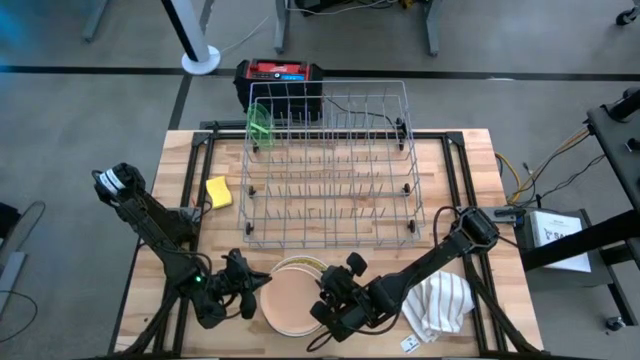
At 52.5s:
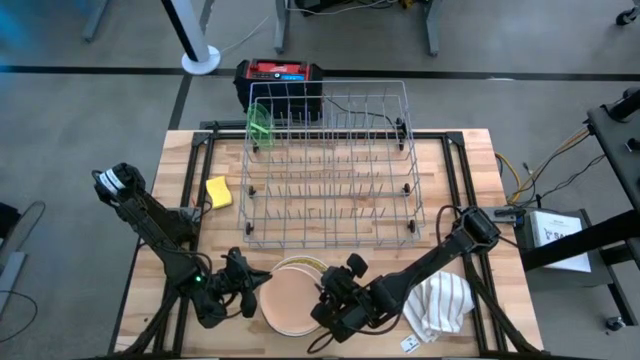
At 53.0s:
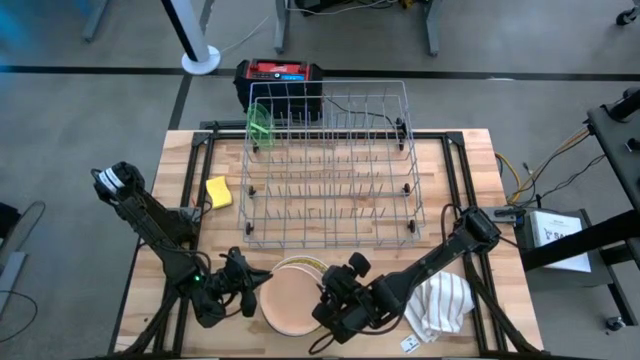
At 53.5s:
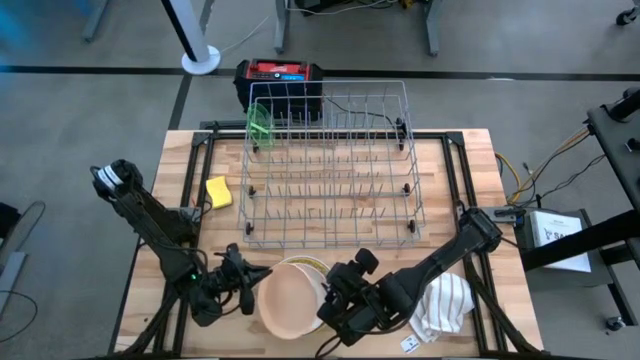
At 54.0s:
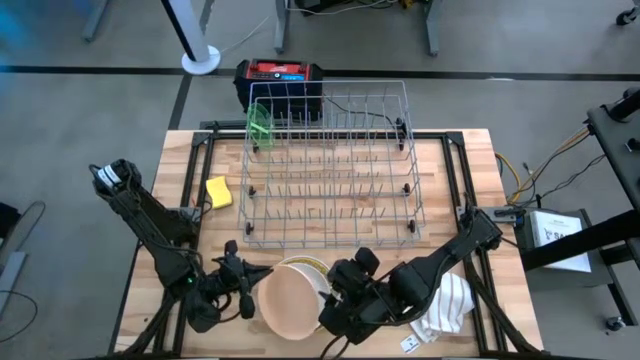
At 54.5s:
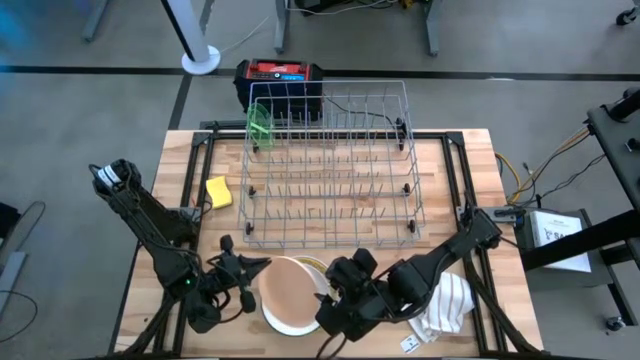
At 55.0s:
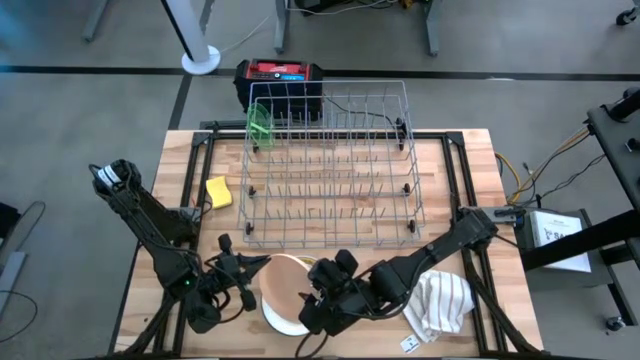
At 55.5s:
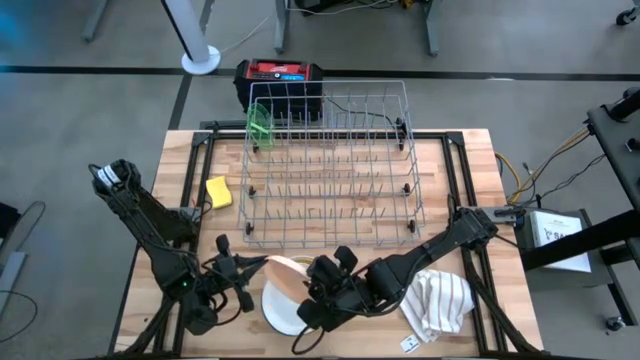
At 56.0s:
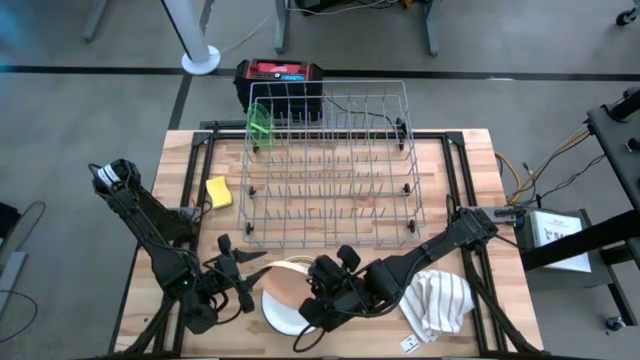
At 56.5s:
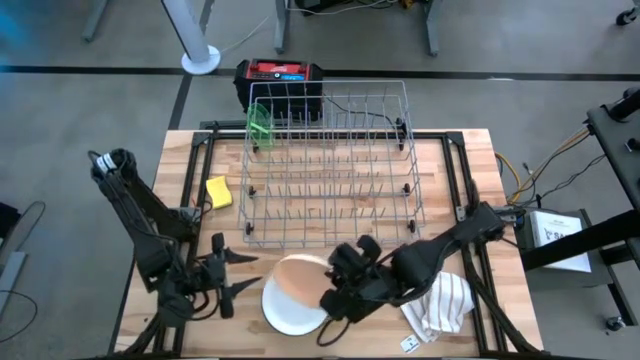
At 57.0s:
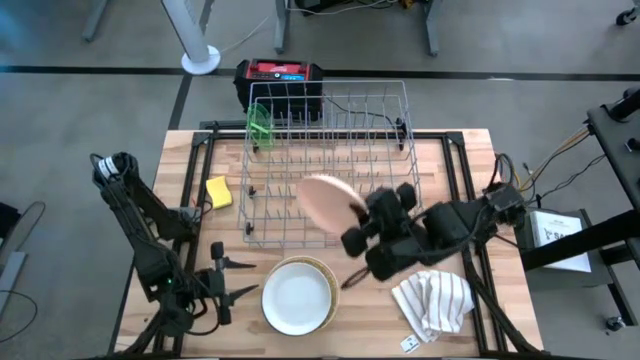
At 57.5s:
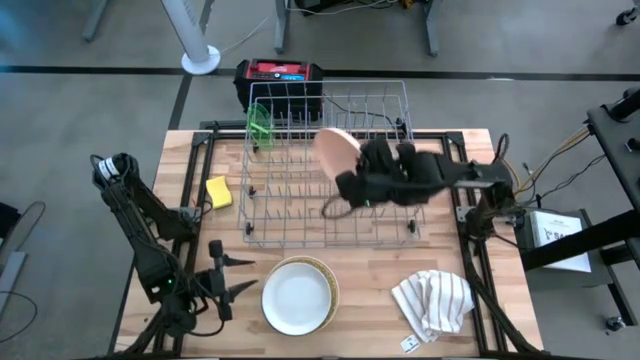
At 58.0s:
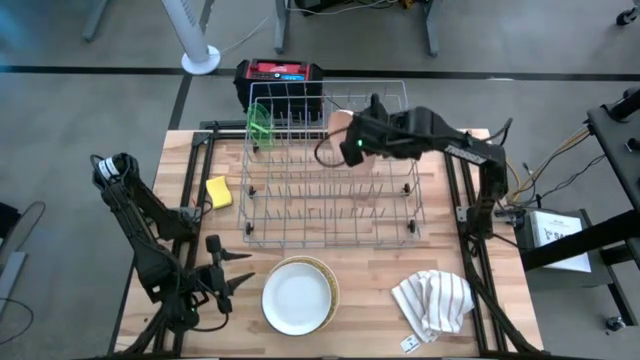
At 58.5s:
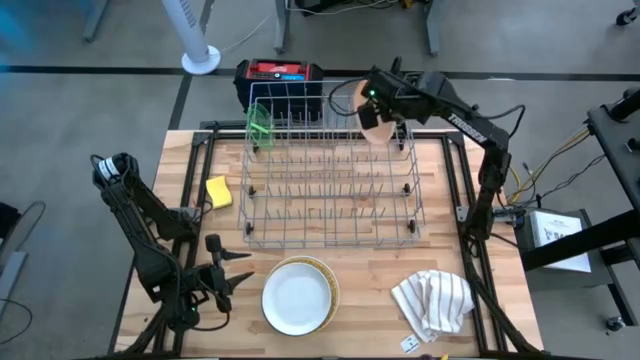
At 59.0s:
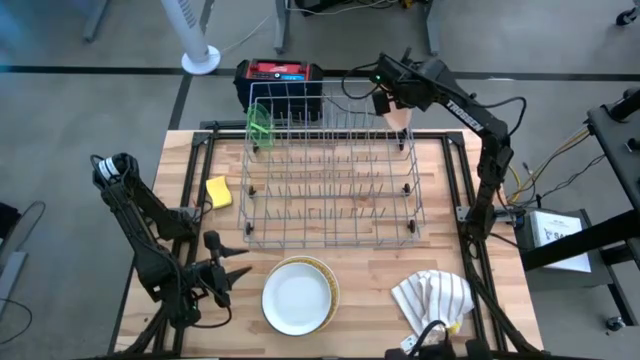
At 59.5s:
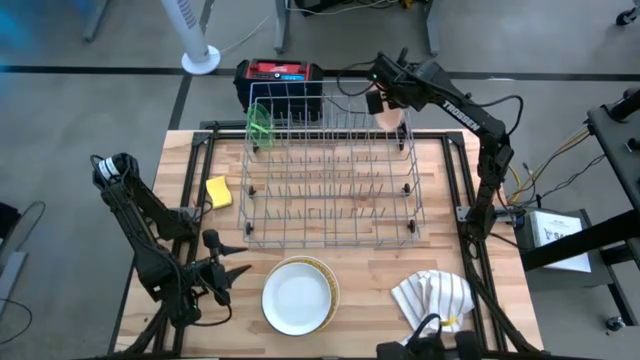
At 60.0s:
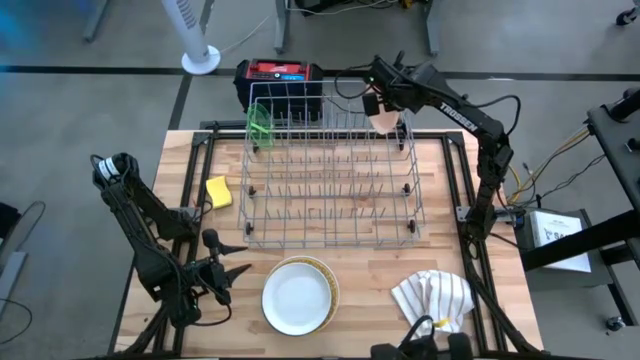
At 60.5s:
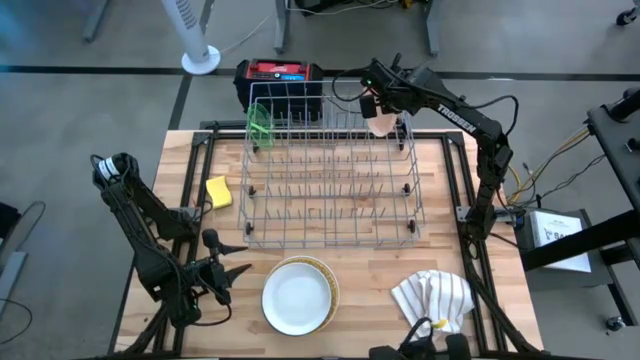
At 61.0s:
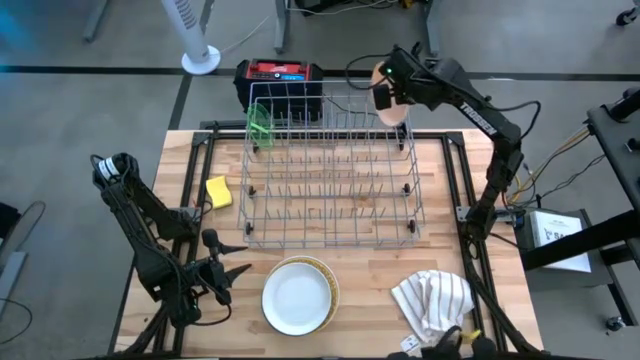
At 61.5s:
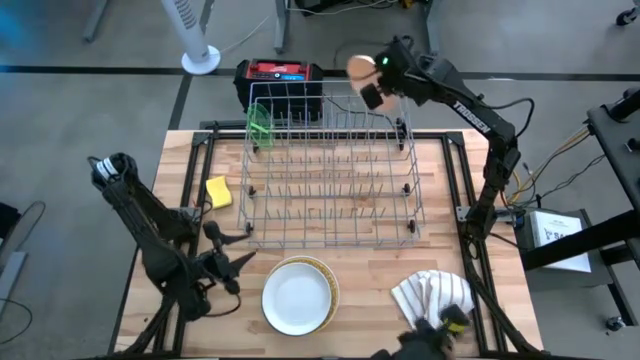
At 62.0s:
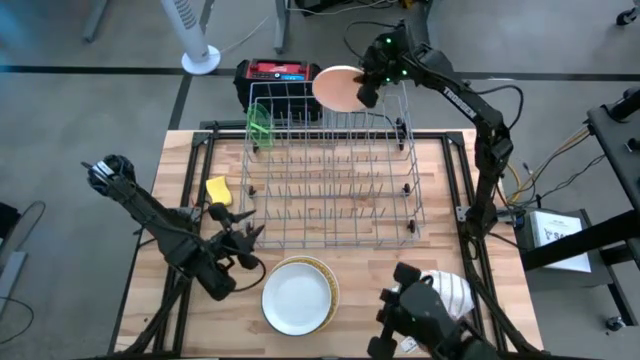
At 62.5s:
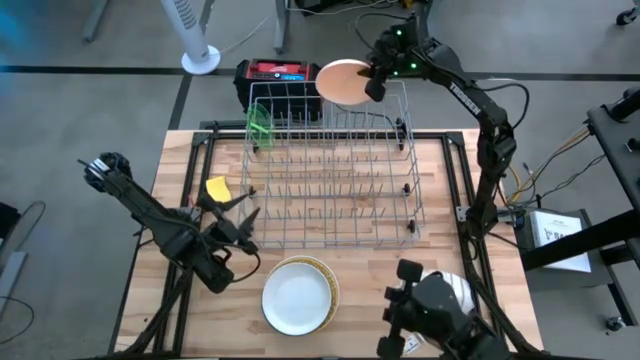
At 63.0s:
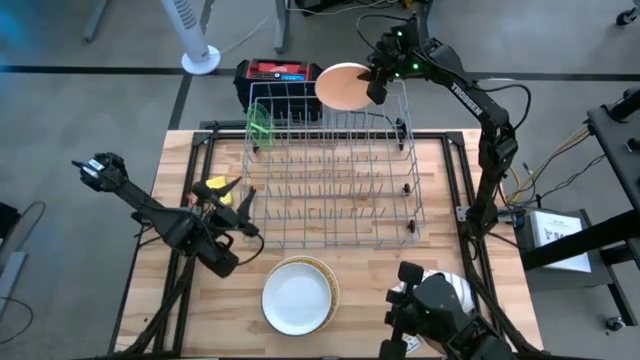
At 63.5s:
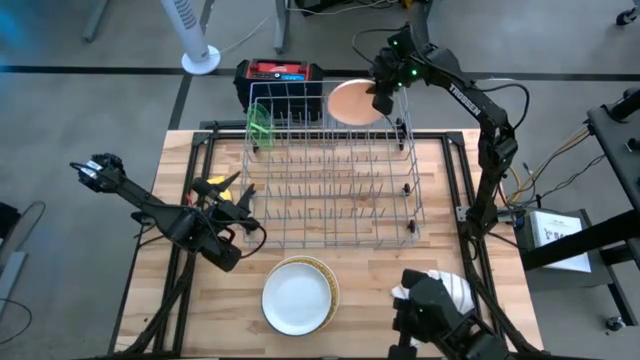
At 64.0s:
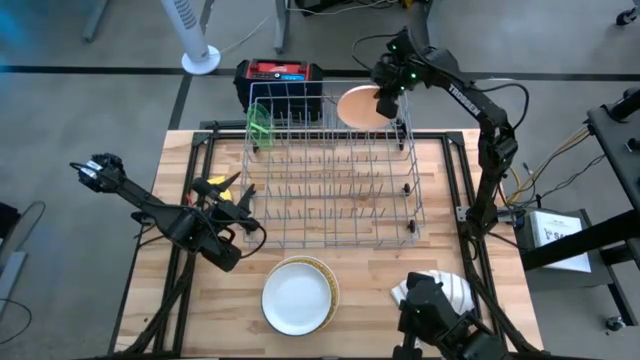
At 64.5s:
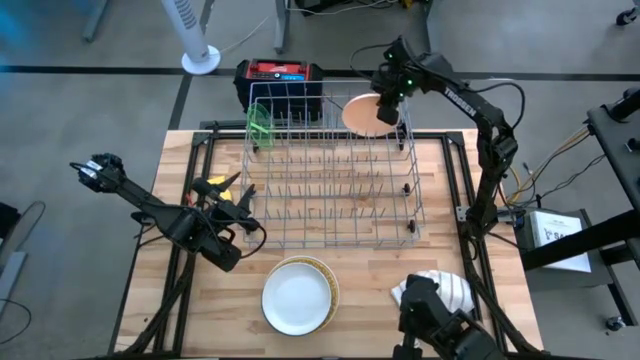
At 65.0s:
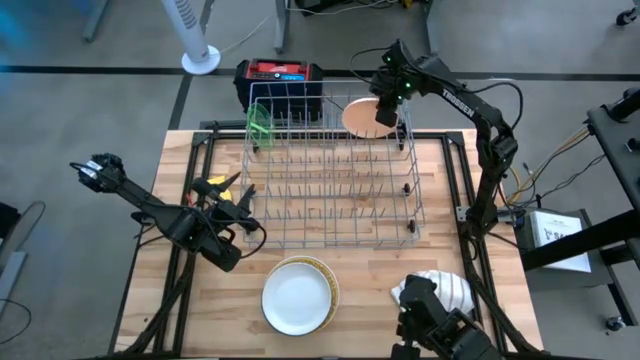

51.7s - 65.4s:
Task: Sort dishes
Put the light pink plate into the dish rack

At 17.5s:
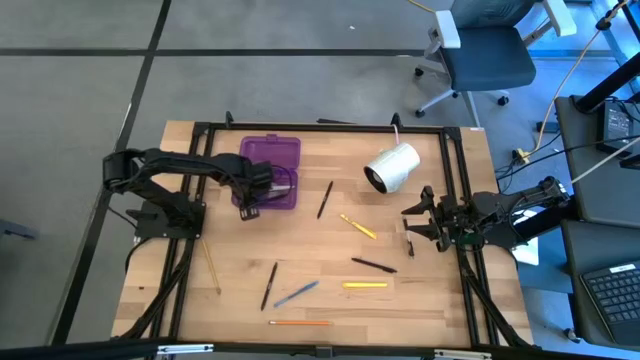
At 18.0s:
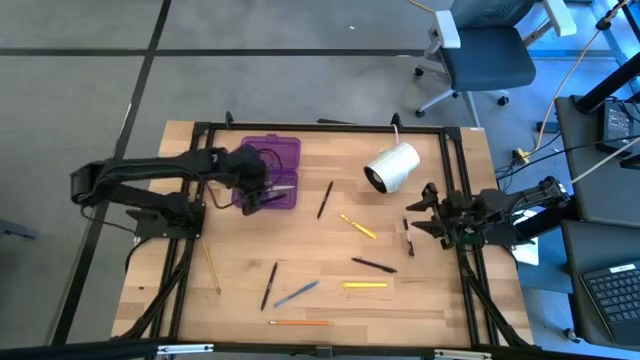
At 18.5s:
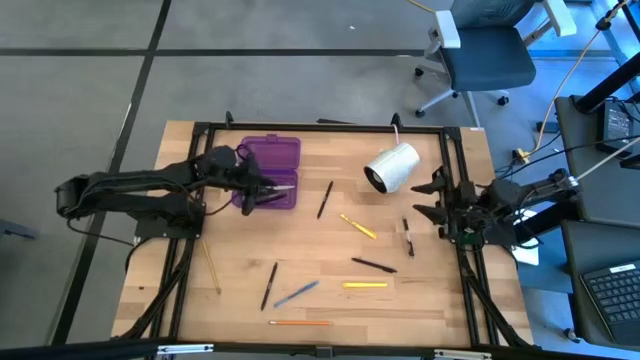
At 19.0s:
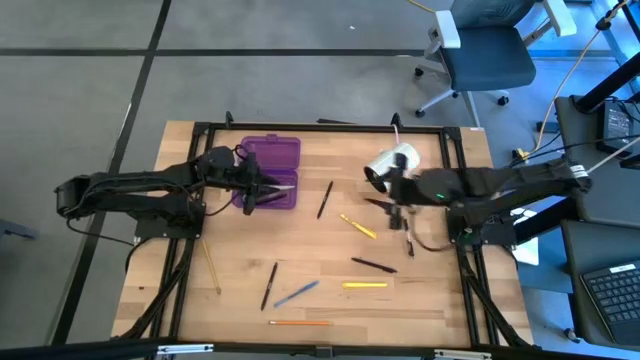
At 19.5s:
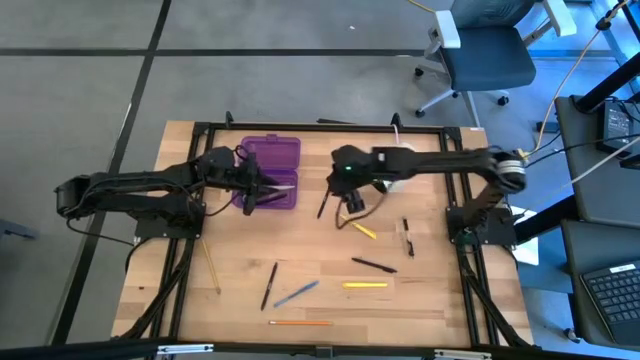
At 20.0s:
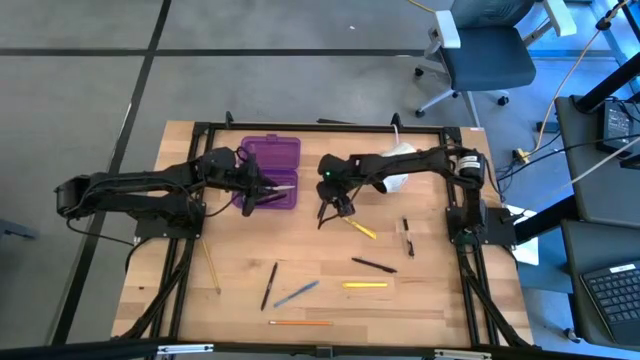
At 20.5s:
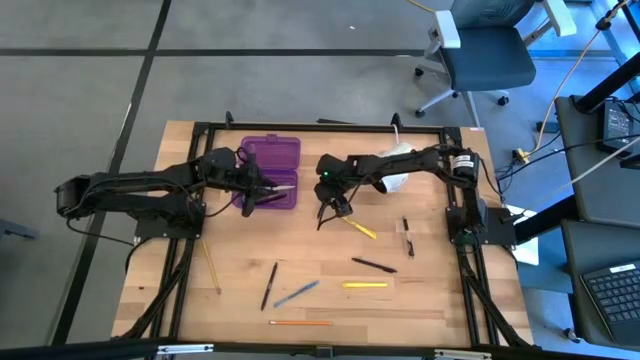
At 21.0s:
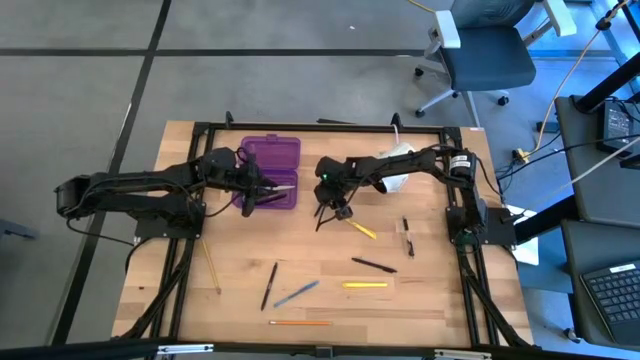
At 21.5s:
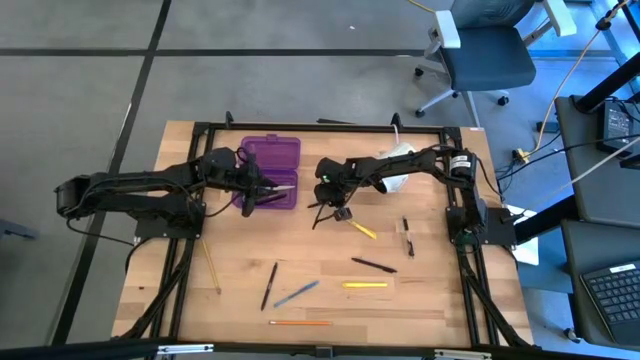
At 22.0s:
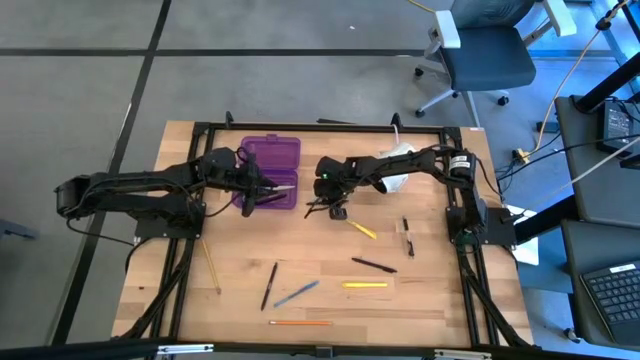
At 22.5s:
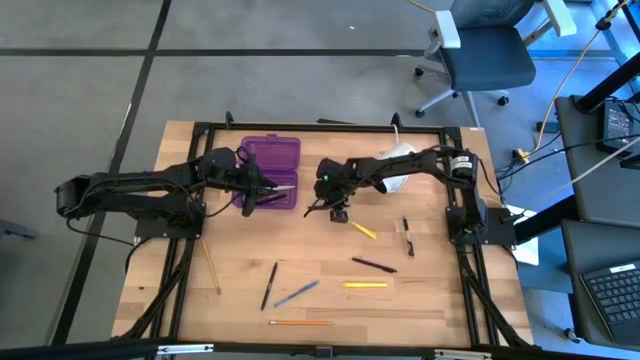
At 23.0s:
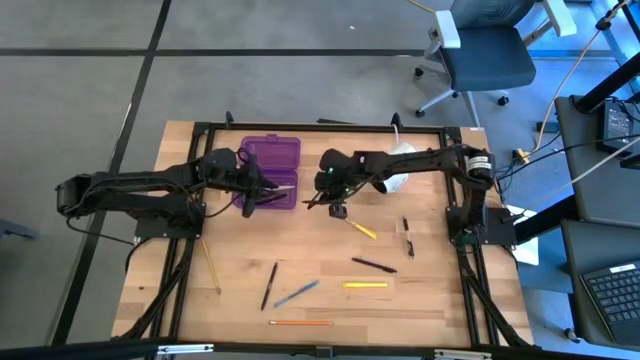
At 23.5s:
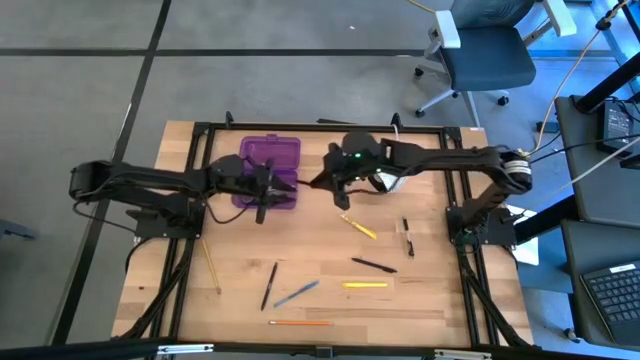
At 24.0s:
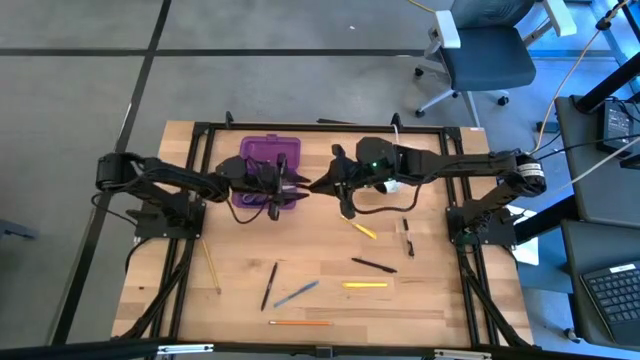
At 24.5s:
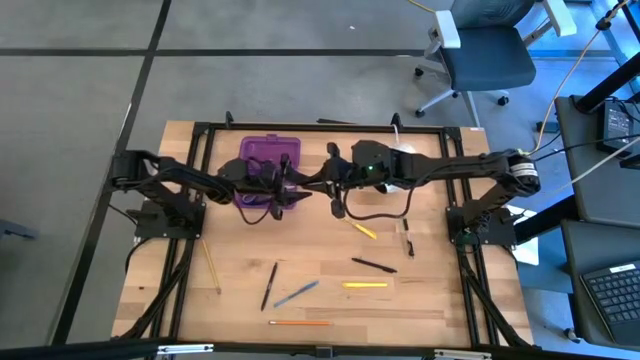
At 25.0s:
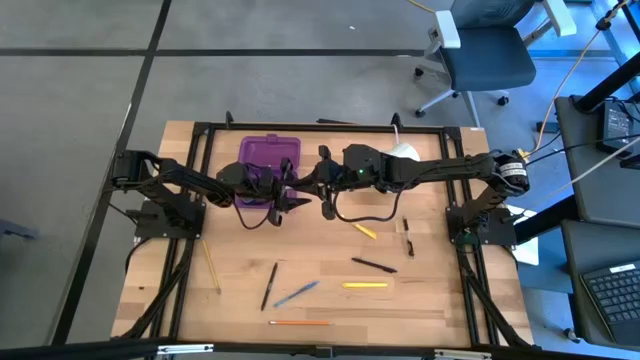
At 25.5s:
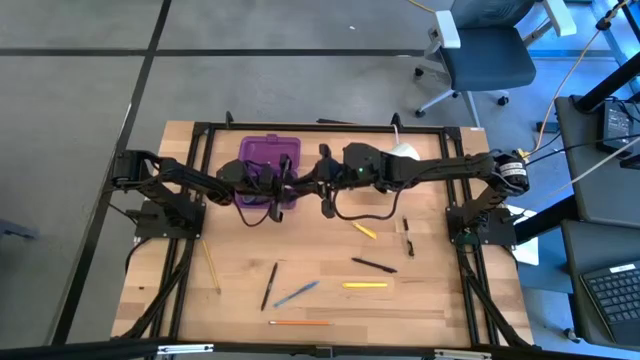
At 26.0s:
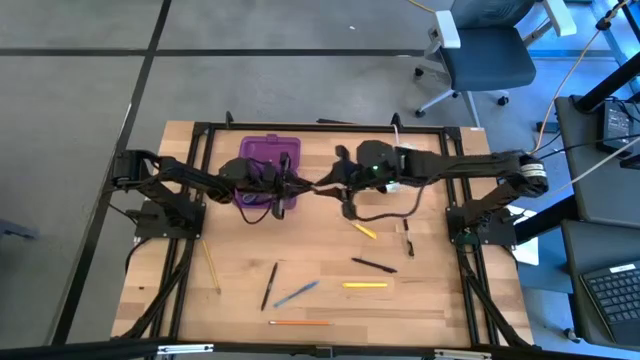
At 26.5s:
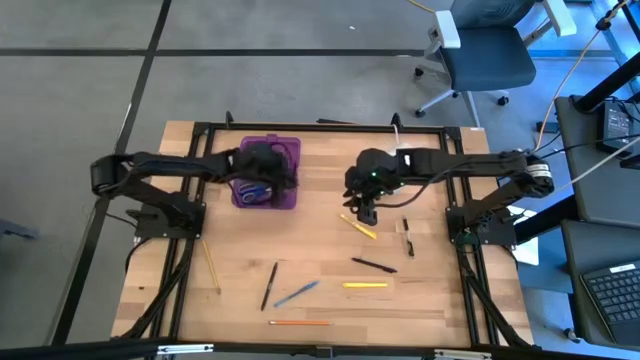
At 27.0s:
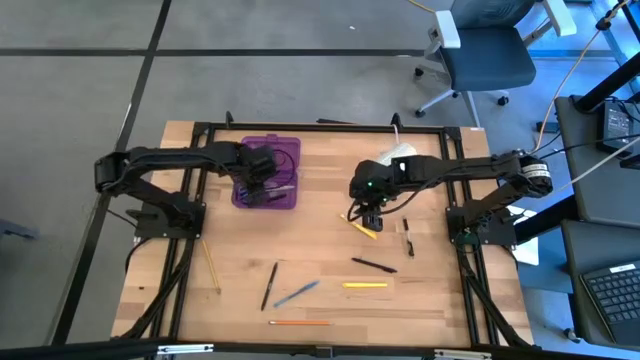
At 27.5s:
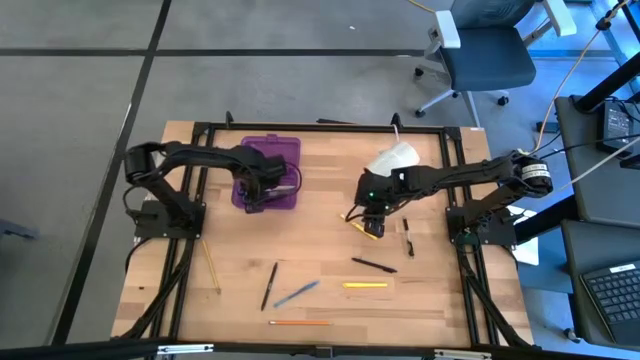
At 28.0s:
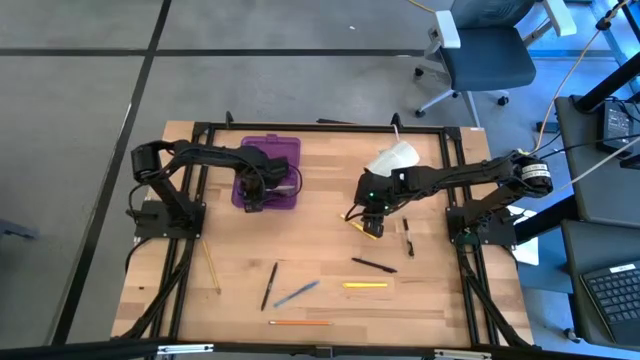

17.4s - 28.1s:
Task: Pick & place school supplies into a supply box
Put the black pen into the purple box organizer
